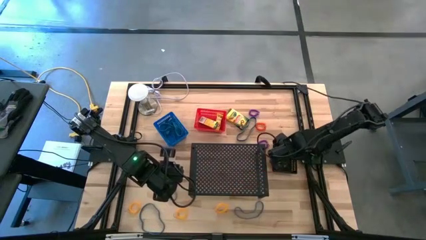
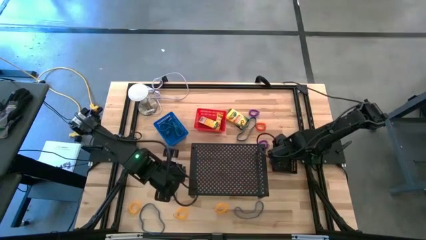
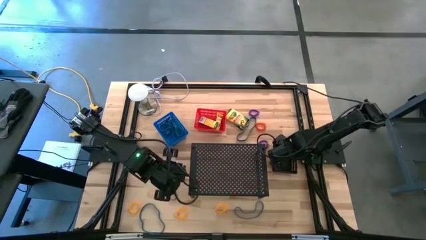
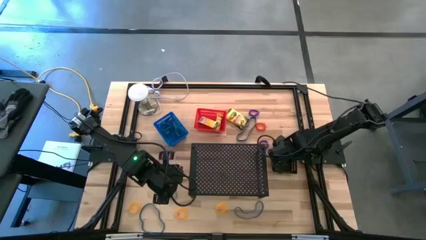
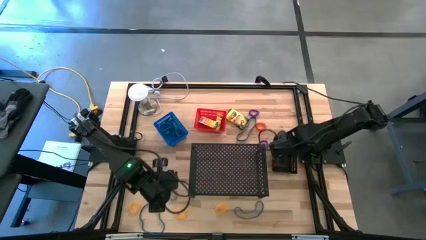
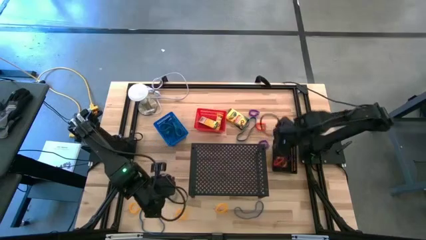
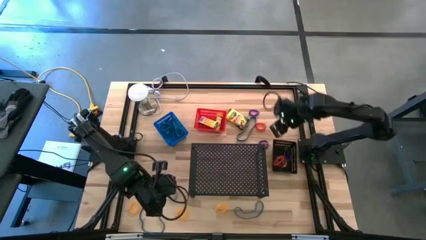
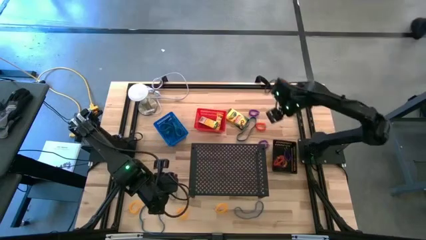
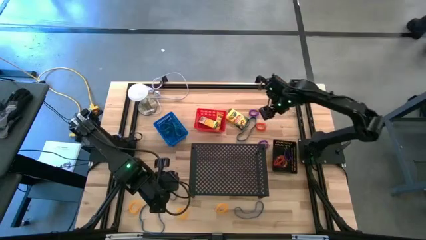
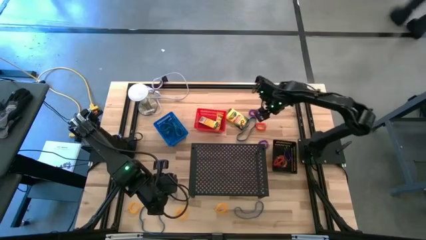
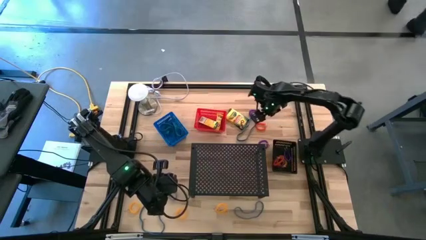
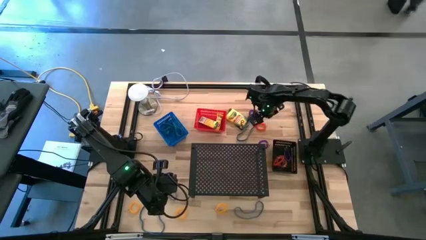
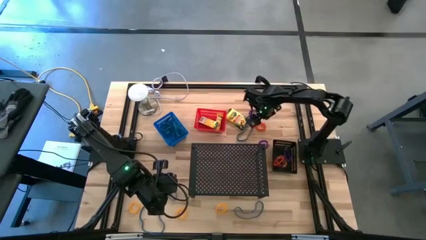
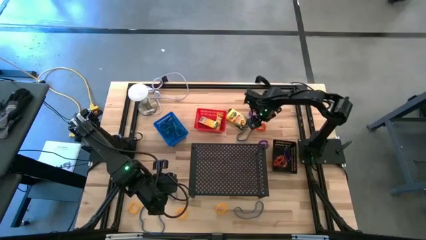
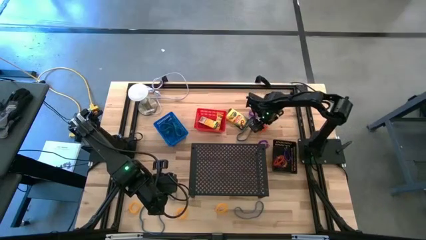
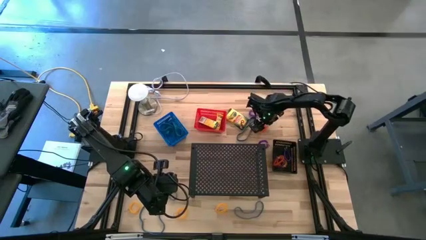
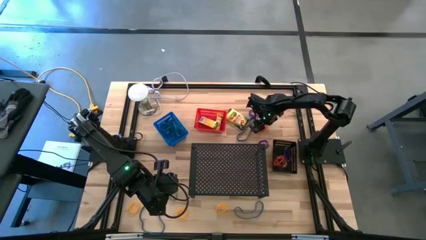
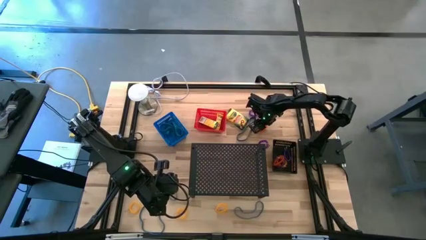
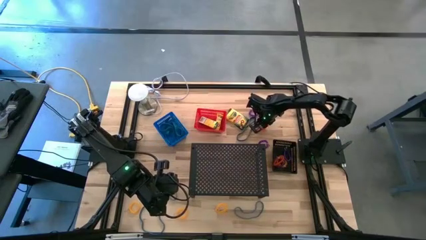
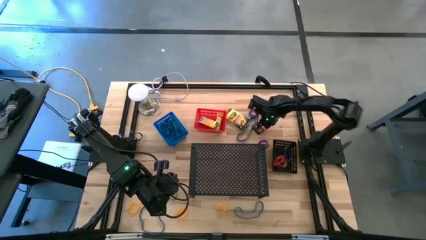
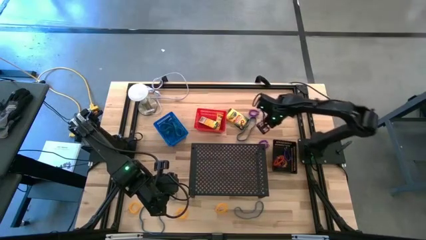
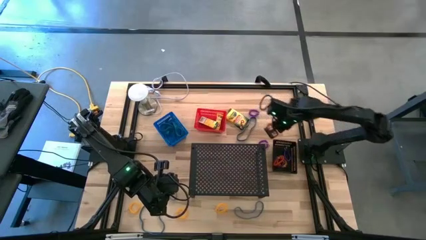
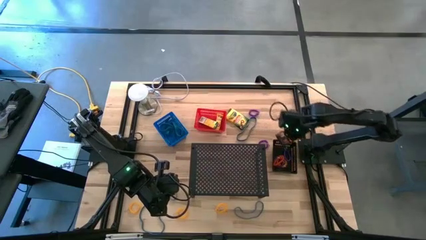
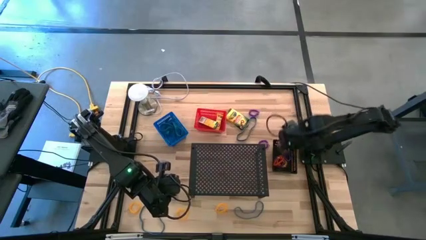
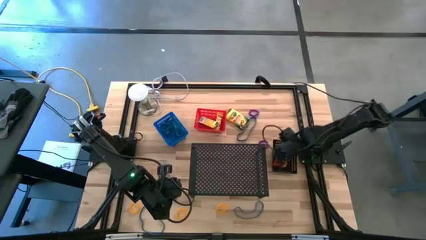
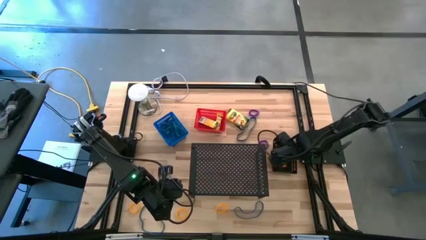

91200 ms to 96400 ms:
Task: Pick & Place Office Desk Supplies
Put the orange spring keychain into the black bin

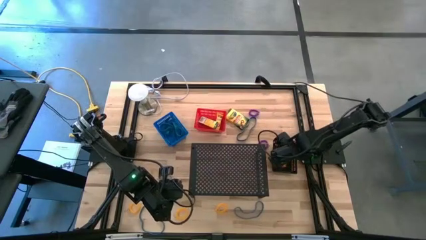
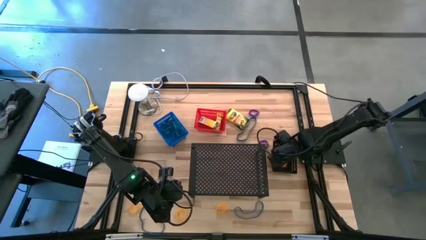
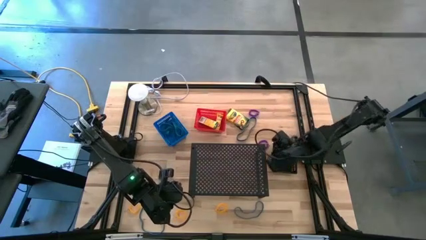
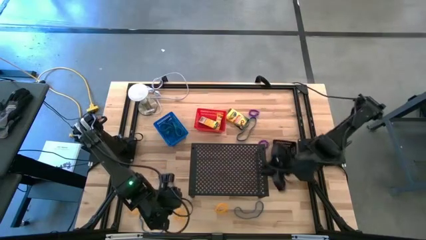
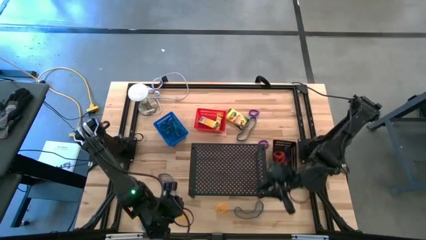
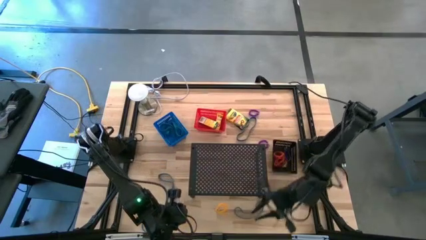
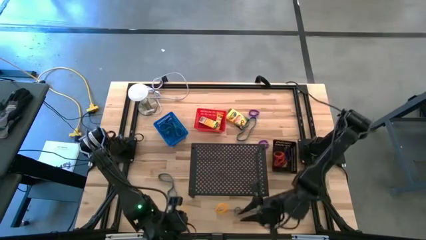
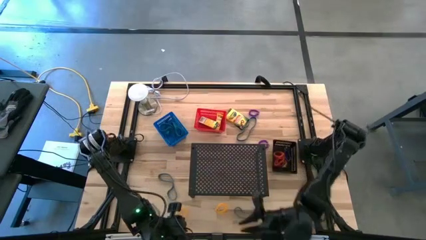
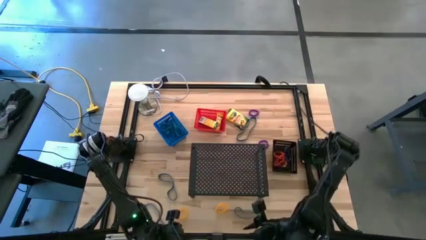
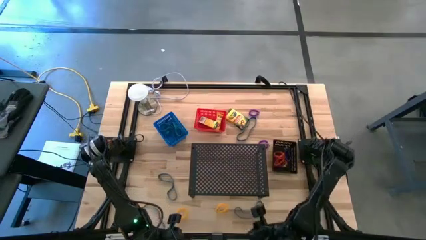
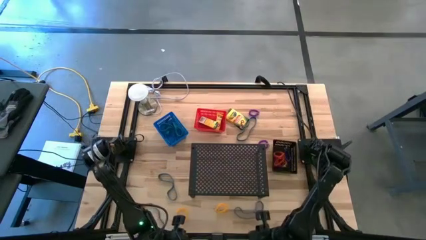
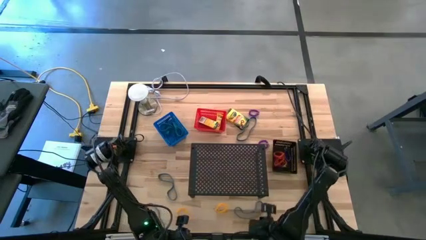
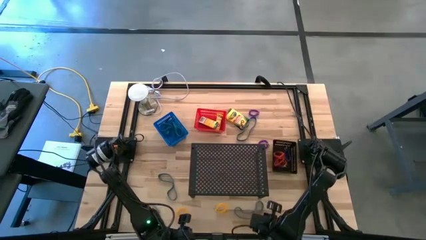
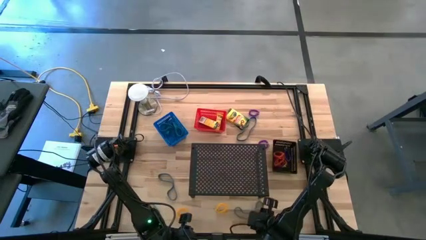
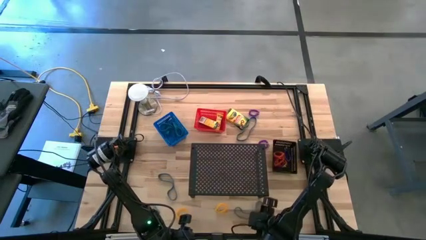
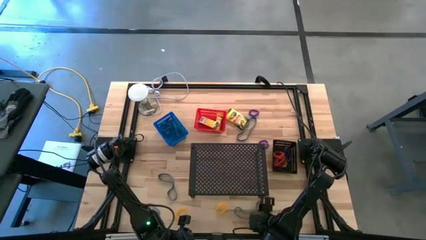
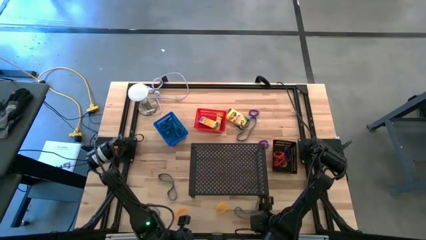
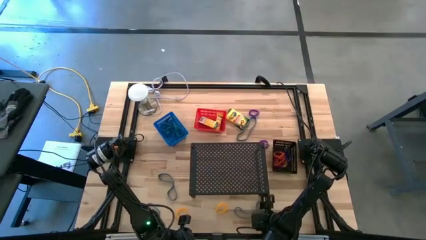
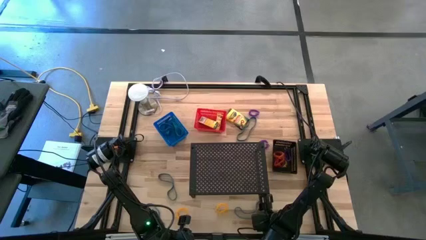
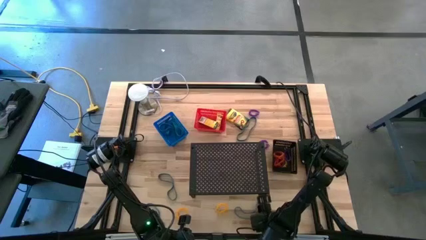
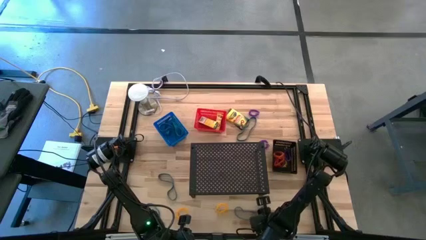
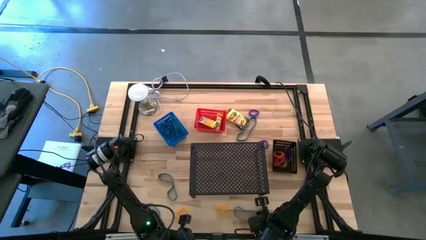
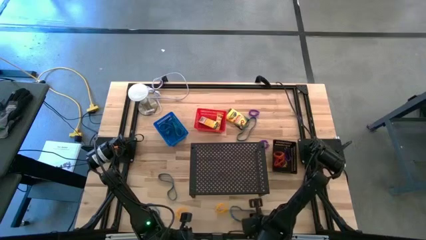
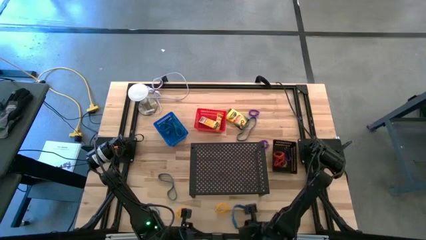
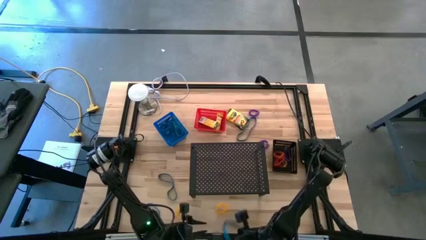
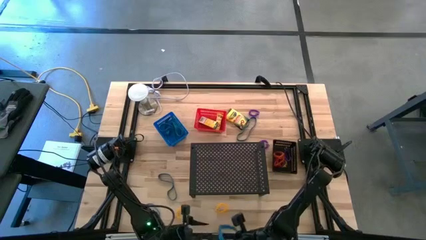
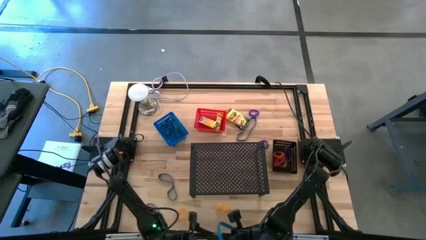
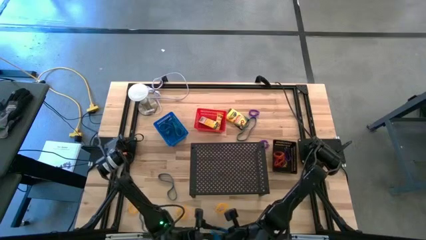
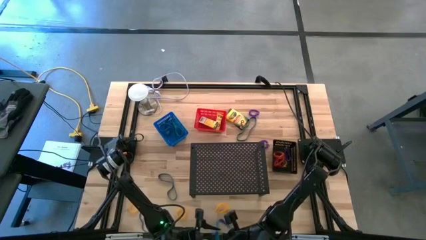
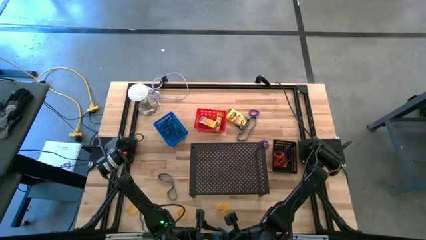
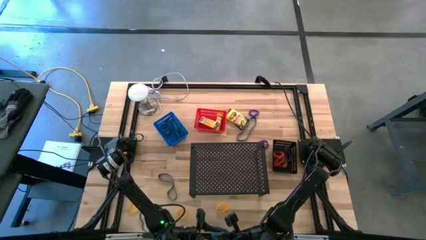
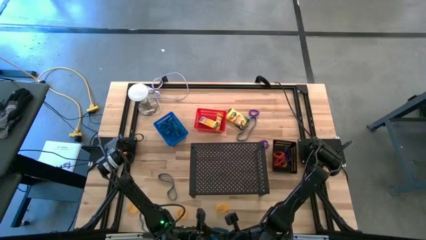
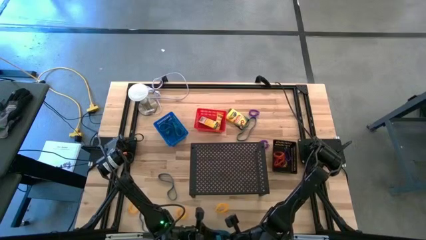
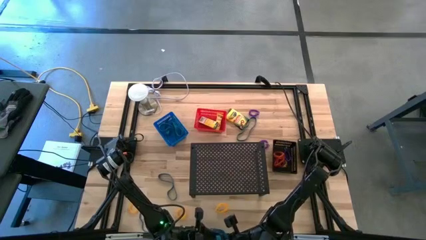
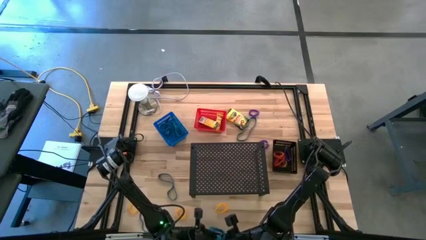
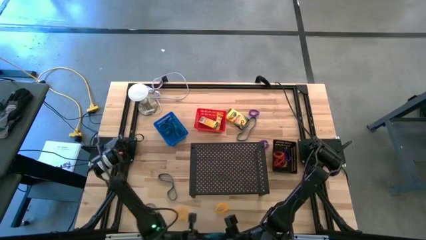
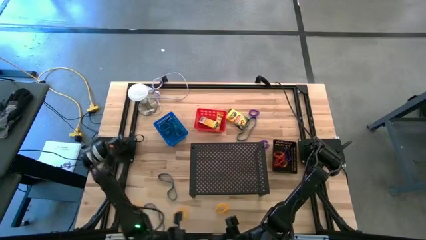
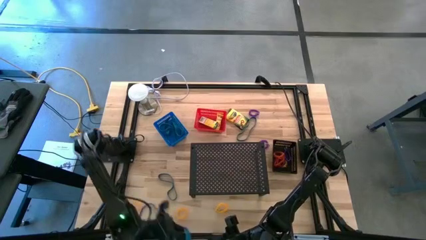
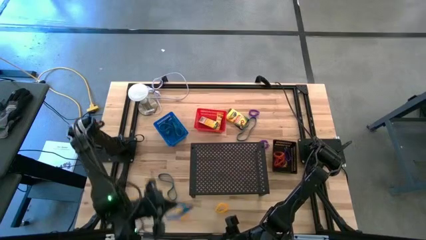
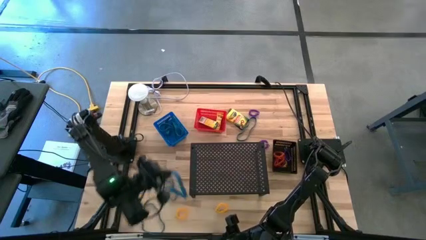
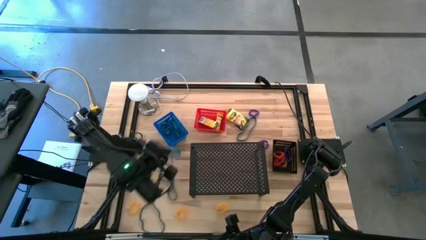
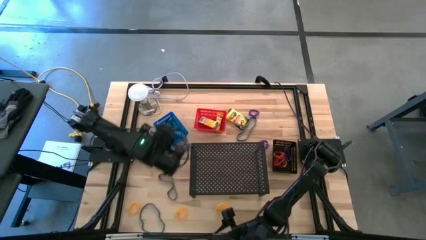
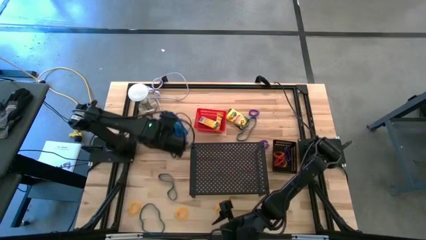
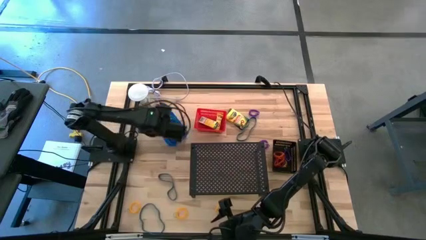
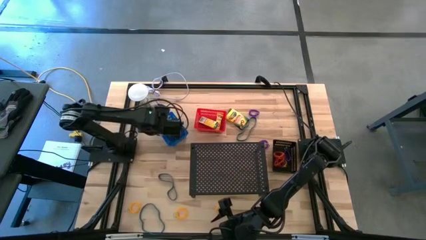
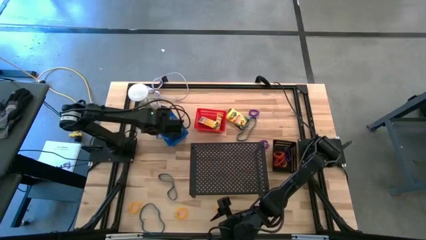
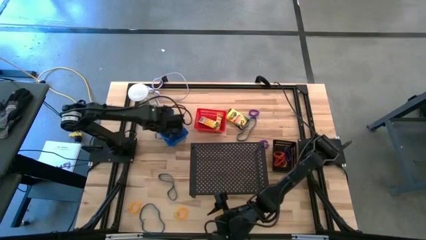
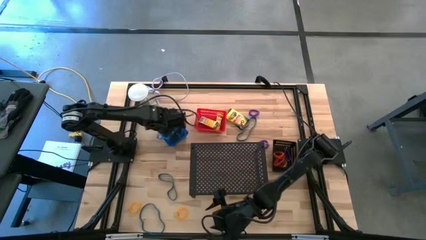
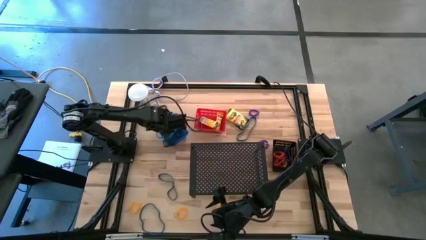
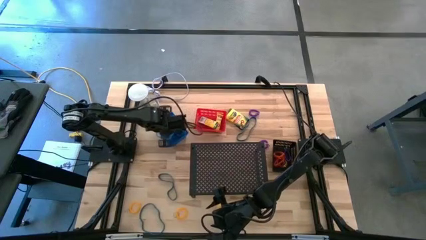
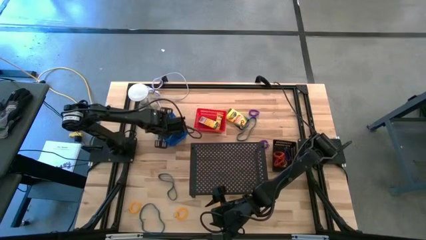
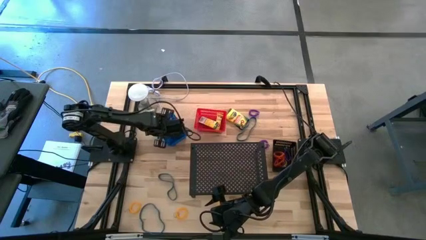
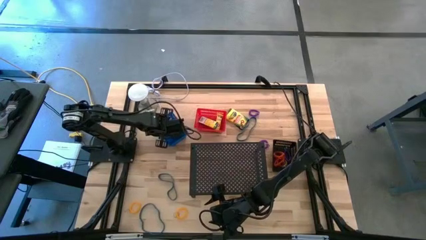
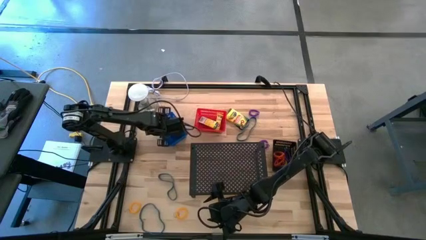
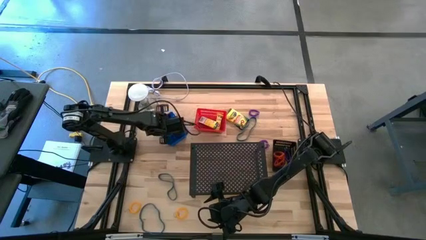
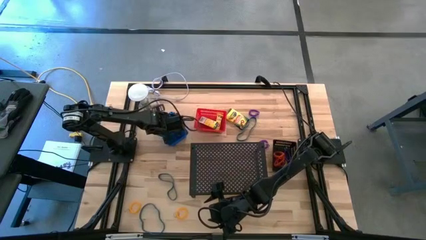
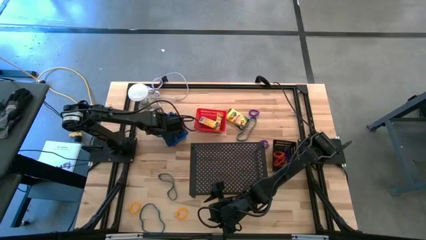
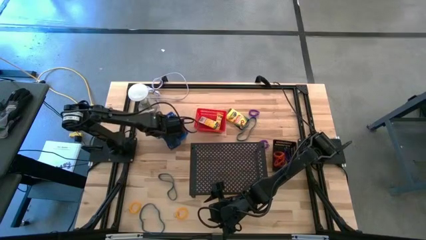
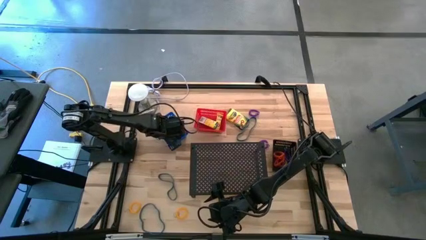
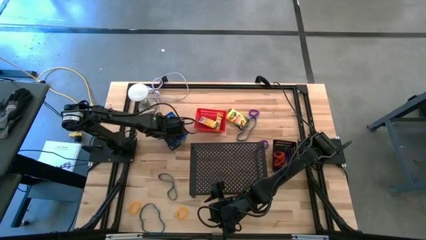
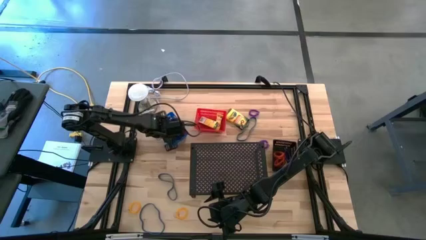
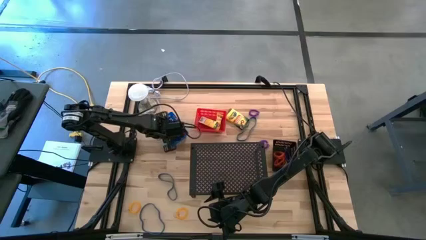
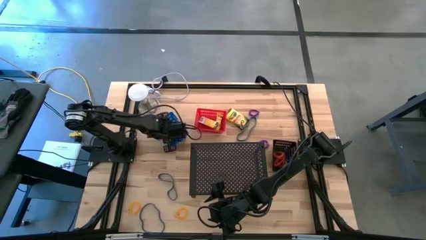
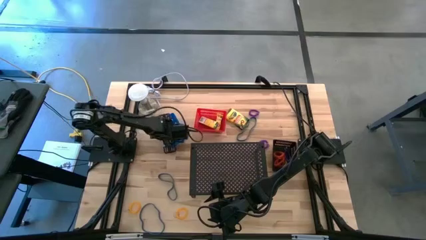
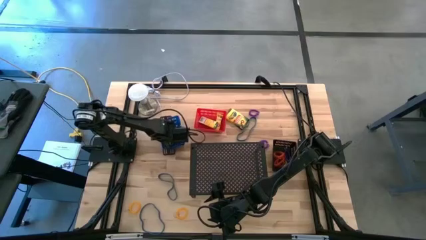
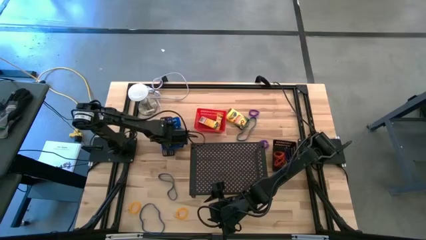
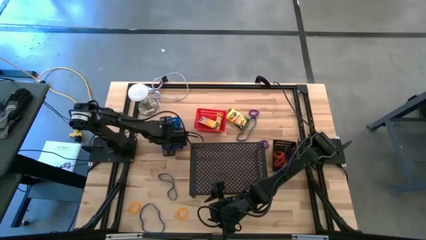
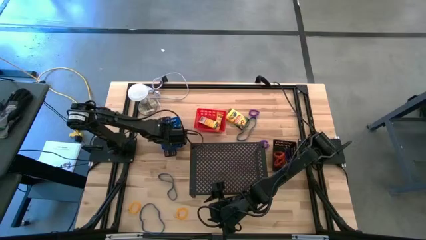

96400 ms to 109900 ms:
Put the blue rubber band into the blue bin
